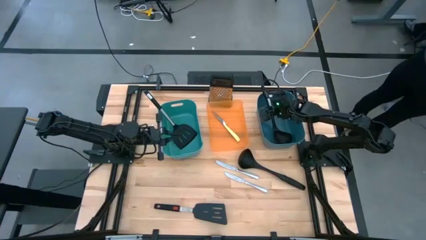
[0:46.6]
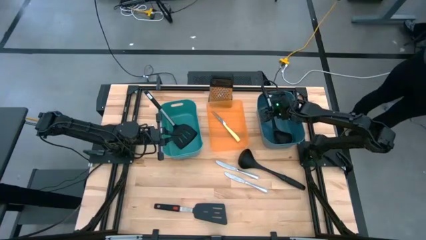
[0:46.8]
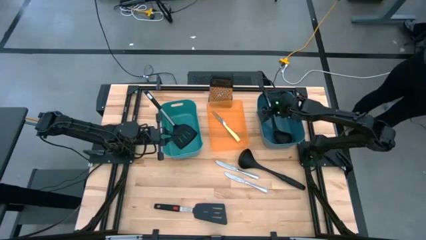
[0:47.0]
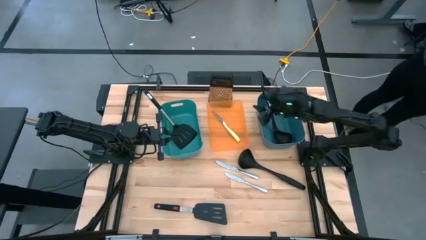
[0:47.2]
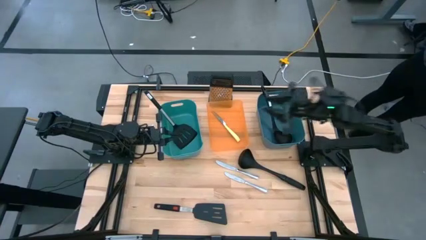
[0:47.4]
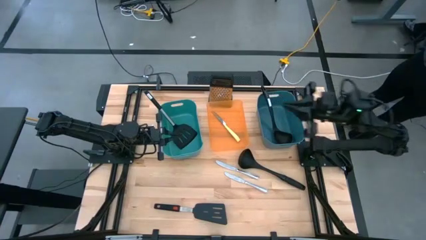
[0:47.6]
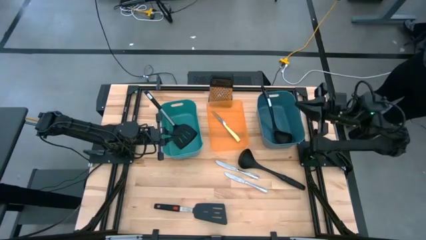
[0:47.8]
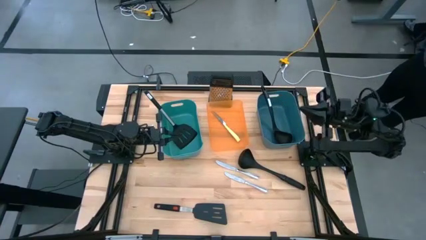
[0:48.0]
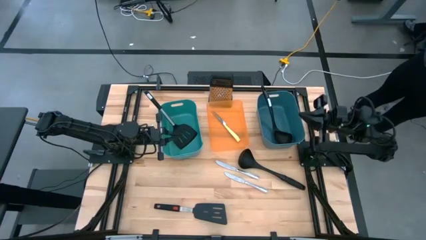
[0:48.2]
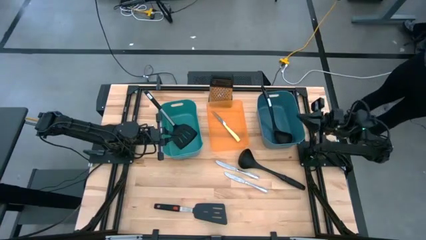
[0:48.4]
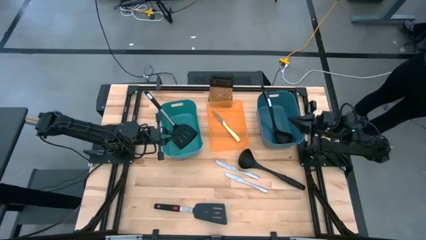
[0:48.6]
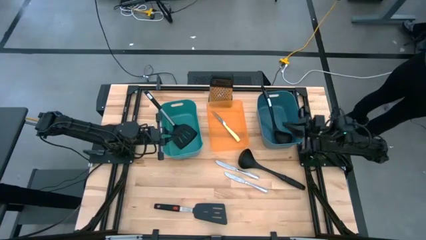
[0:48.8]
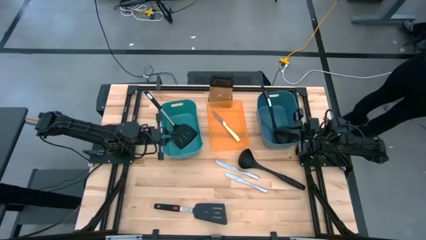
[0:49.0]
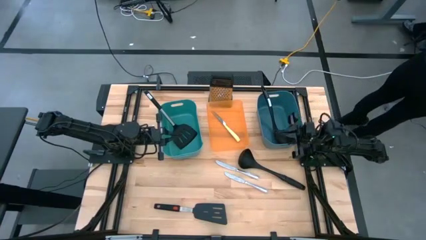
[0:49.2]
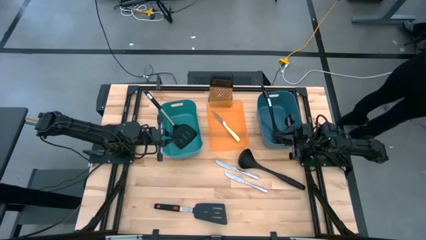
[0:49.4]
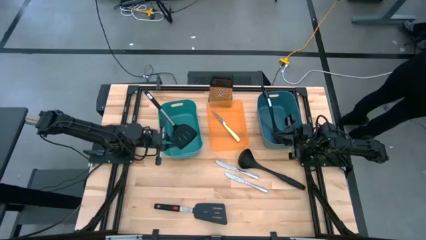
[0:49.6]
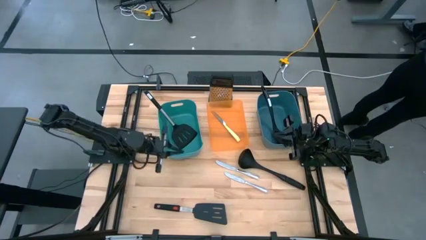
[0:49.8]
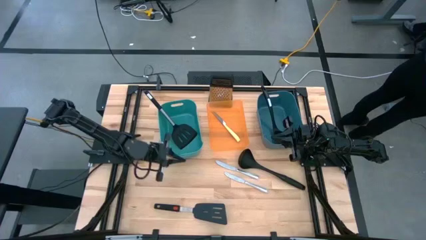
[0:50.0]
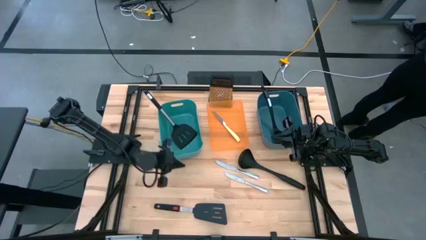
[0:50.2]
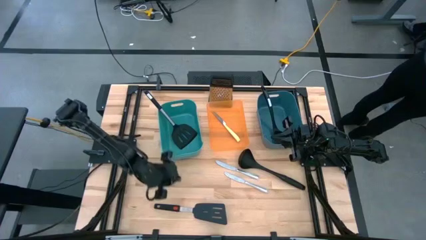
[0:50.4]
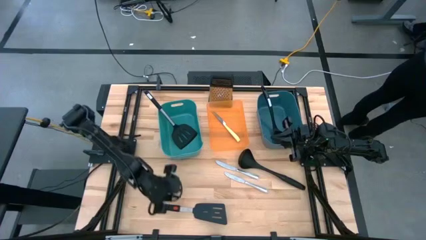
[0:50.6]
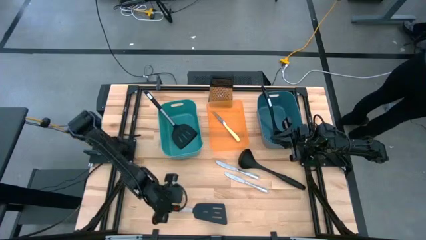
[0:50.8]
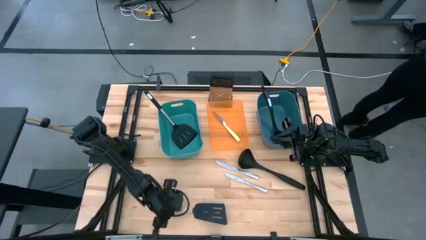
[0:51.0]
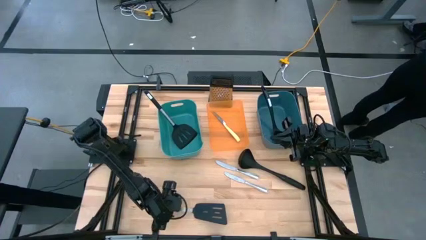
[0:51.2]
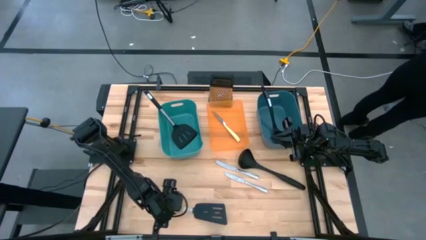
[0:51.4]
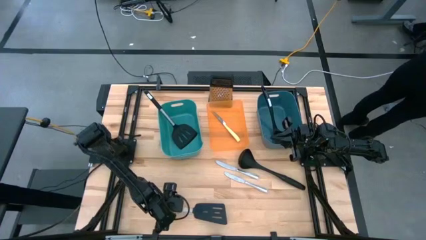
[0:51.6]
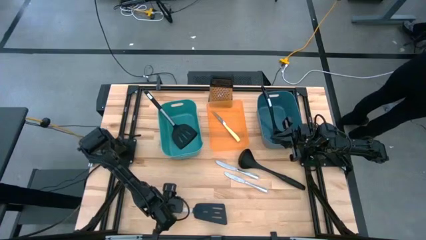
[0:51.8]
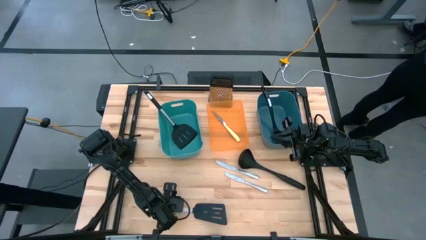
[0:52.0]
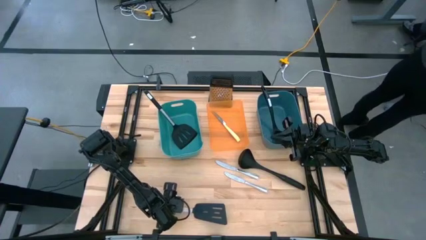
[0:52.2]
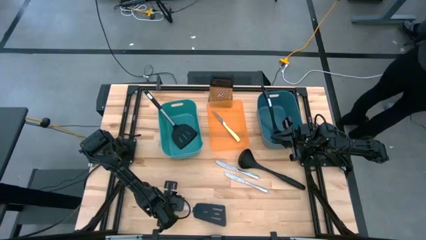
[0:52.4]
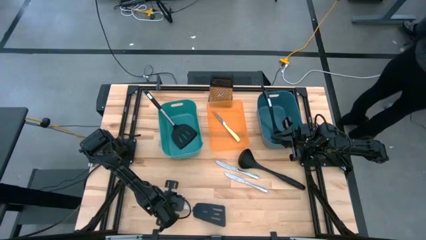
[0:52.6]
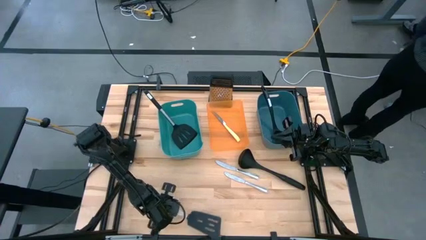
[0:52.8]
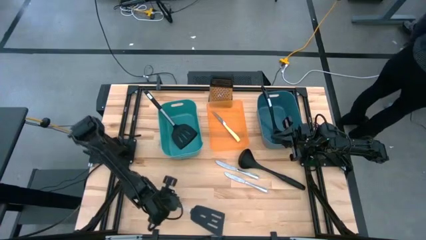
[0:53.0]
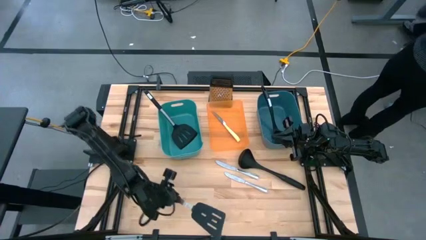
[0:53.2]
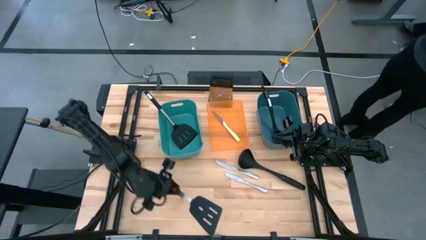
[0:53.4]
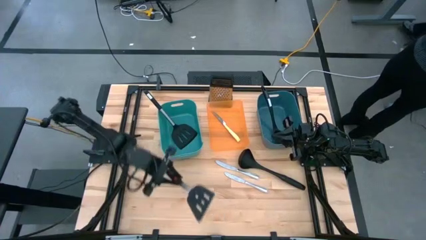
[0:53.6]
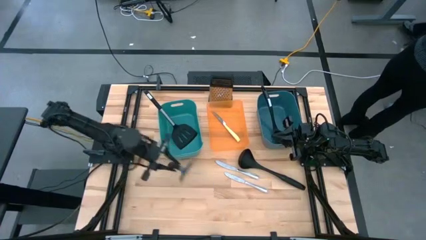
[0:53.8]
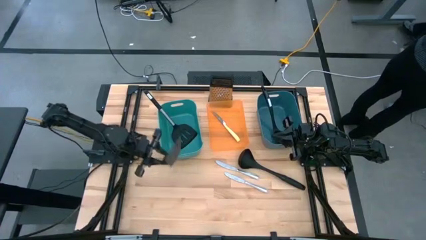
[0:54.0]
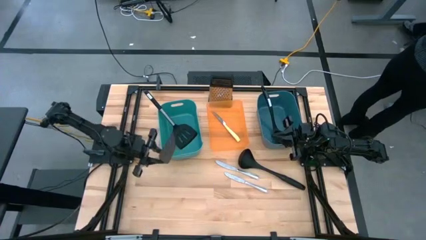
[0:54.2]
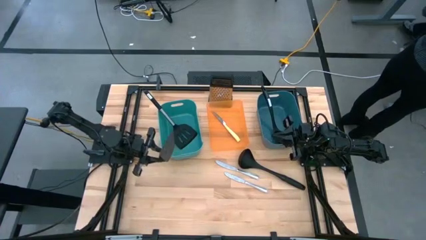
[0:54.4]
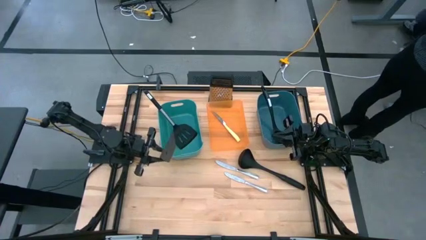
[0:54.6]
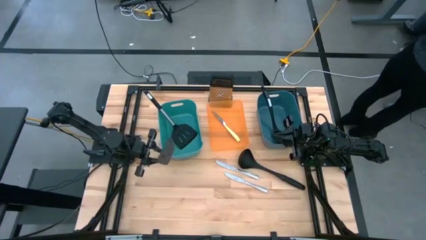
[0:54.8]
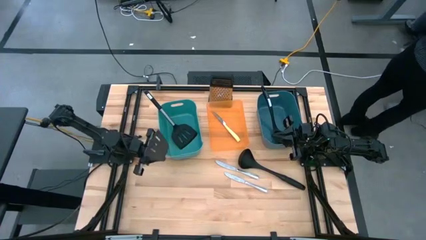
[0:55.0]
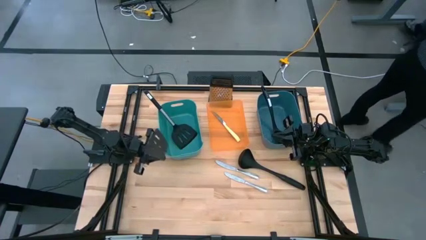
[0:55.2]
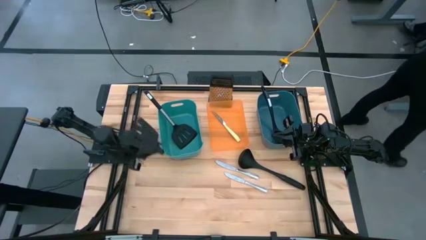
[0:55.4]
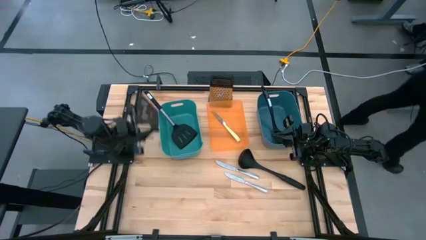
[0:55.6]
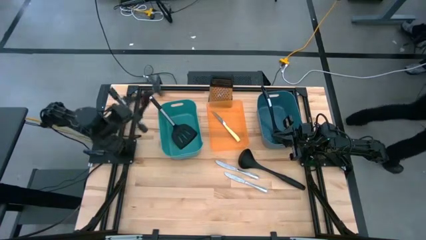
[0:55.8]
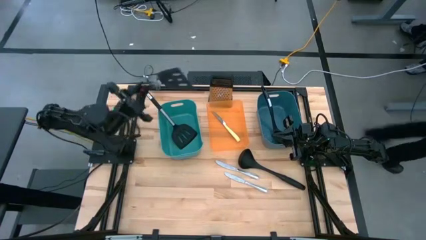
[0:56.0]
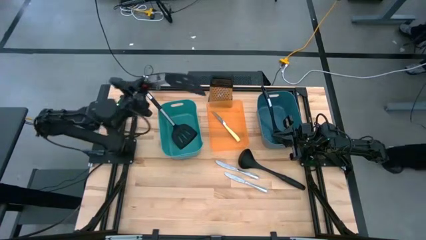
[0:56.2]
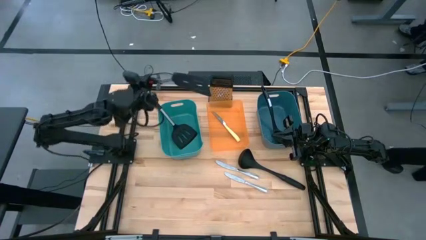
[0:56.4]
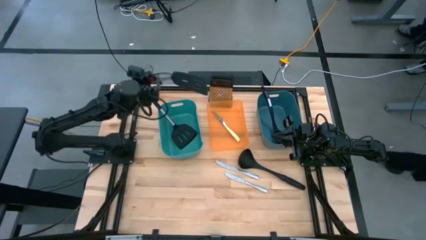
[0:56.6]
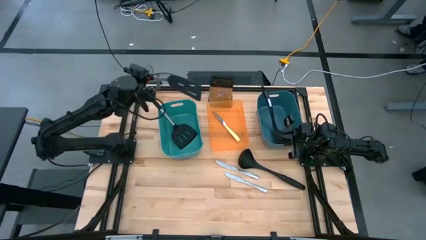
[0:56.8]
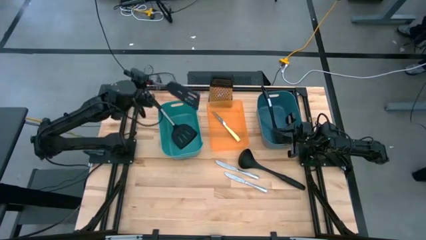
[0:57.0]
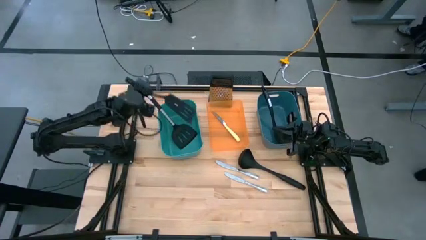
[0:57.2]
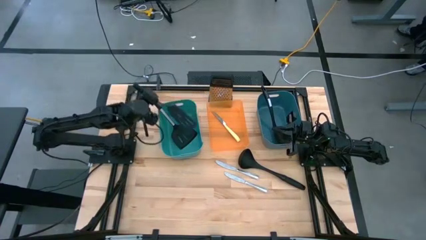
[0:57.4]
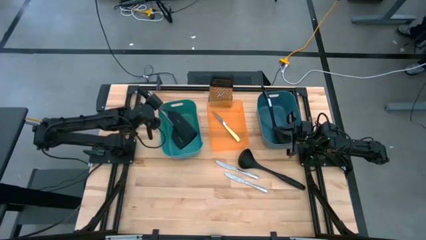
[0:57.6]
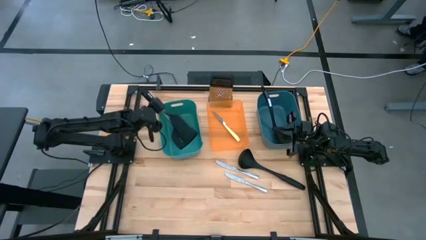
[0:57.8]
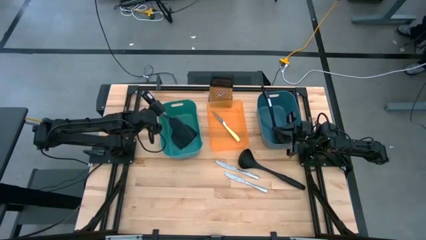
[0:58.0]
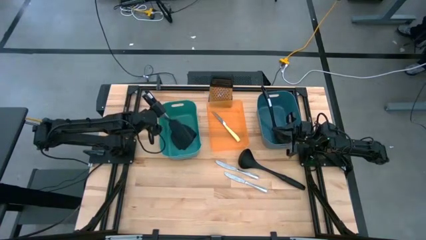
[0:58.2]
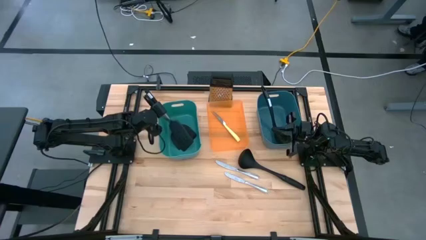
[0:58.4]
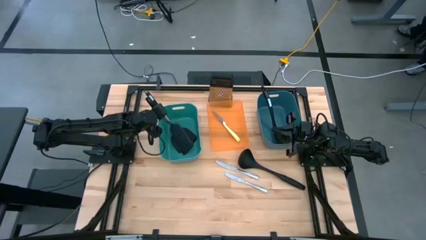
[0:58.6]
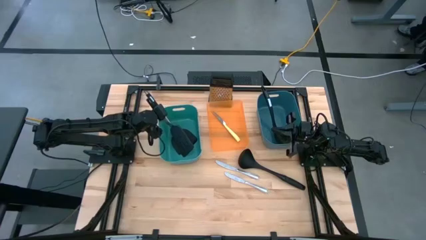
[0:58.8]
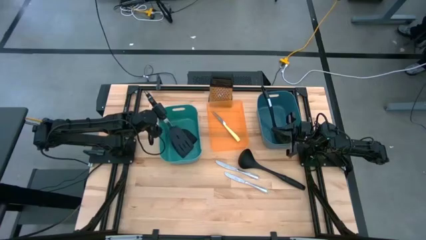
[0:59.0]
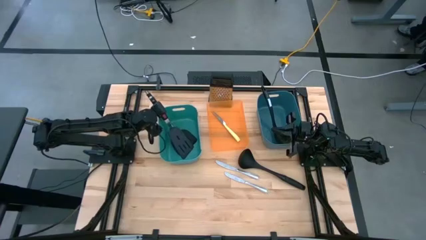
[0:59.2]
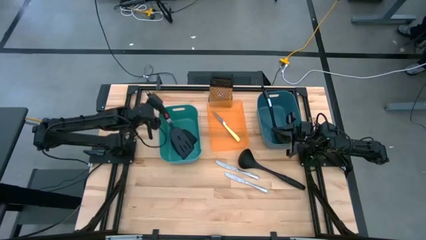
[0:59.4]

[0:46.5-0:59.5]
Task: Pick & Place Kitchen Items
Put the black spatula into the green bin

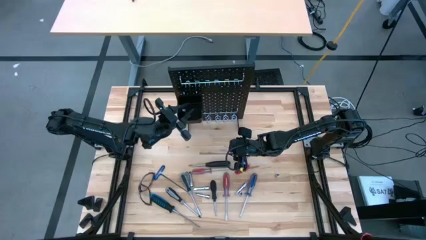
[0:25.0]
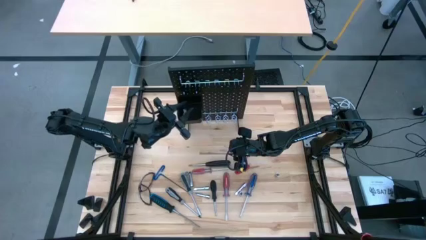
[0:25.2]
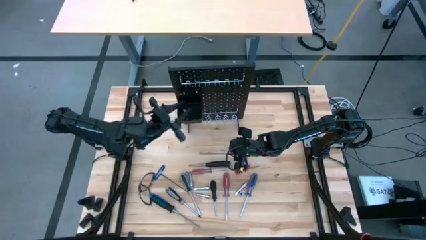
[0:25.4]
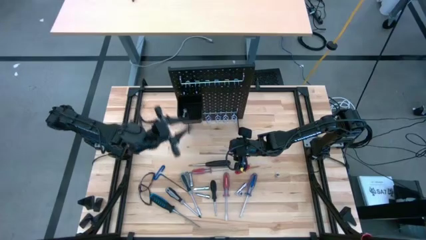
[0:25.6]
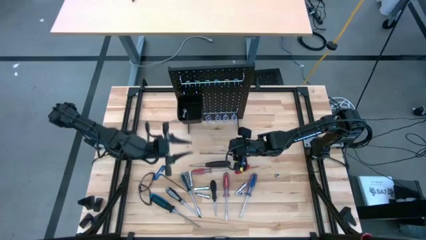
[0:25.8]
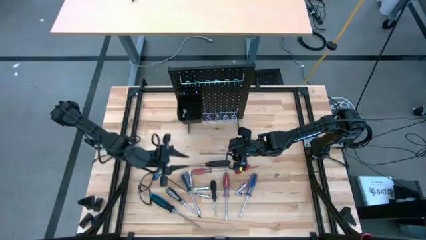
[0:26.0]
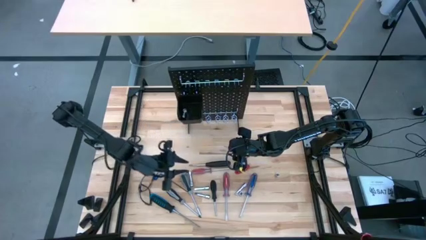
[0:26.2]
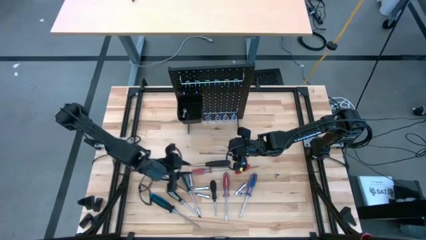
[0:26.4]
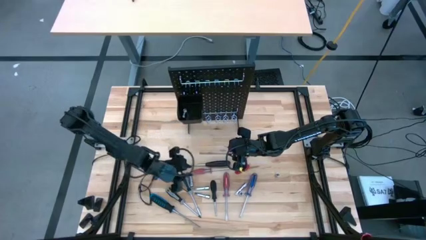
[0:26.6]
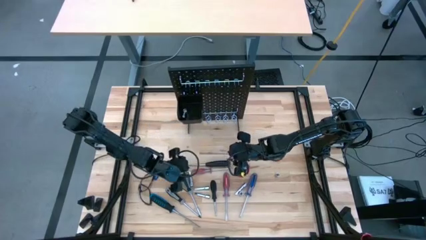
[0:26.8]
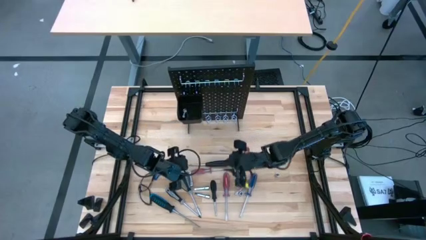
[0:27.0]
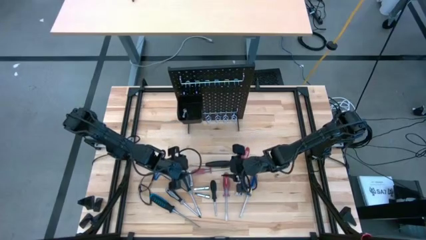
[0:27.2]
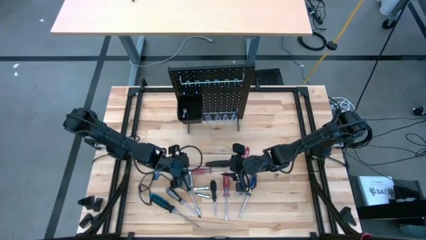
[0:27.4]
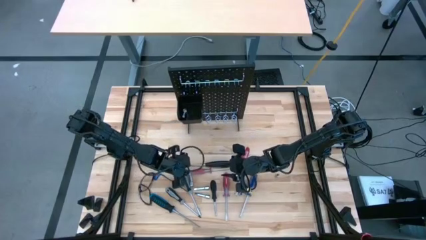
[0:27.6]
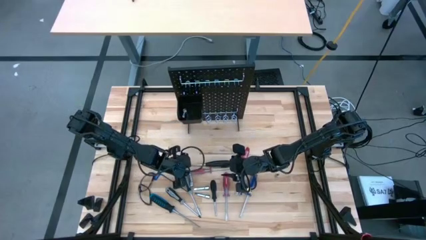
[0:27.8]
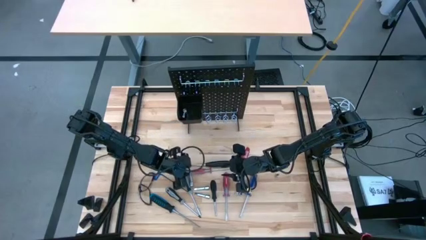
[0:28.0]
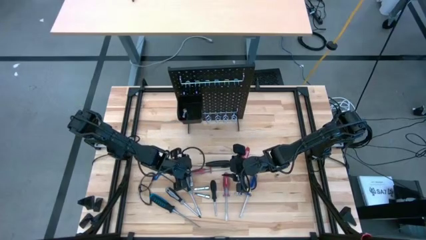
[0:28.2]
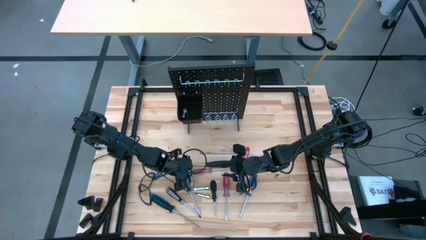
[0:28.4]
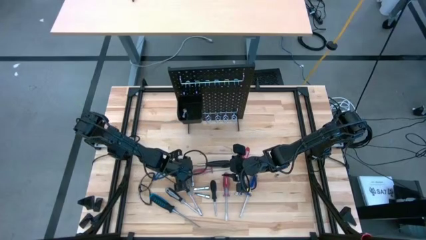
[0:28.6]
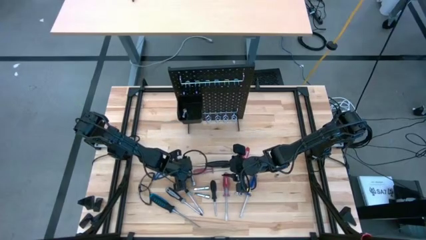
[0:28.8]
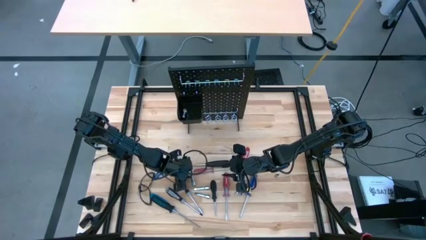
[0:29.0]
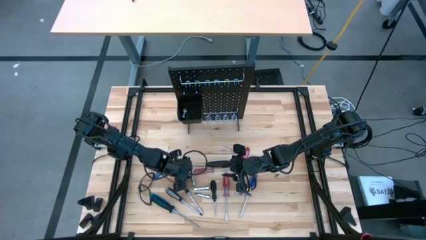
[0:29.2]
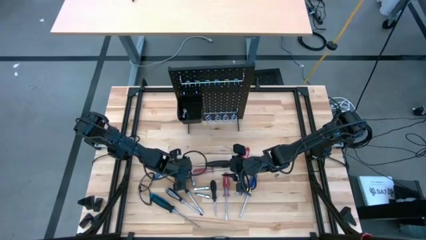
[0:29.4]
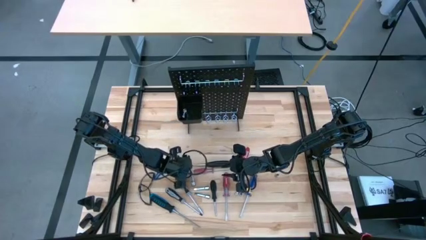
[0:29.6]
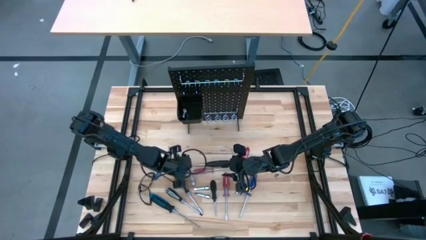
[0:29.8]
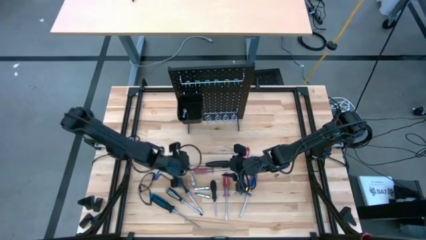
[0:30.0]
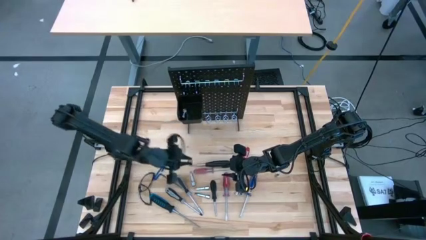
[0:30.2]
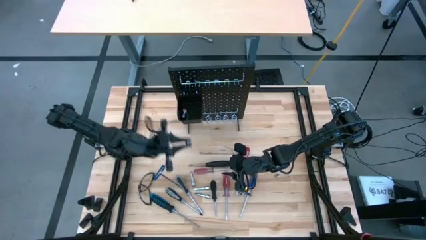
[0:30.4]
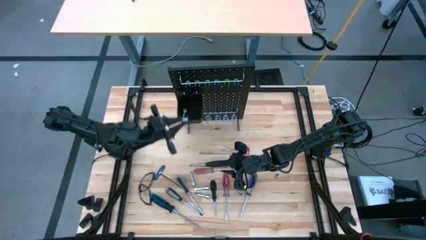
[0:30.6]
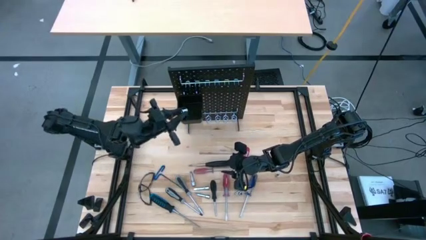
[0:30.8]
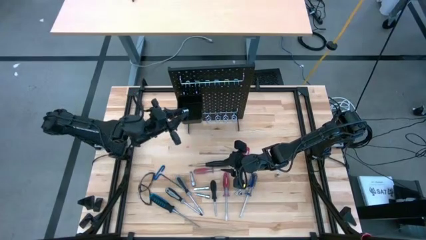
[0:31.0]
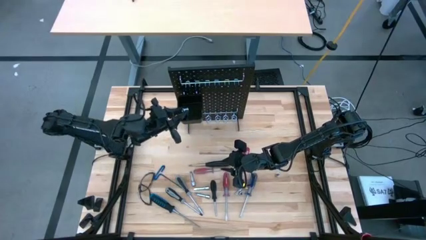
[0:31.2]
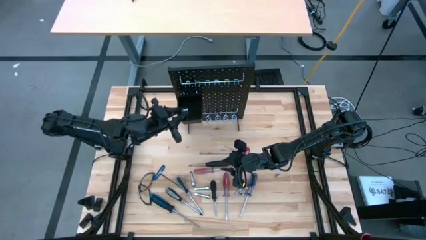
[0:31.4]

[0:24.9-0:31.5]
Task: Hang tools onto peg board
Put the socket into the black bin on the pegboard
